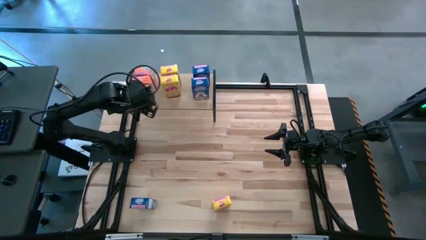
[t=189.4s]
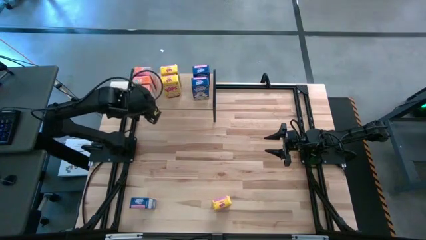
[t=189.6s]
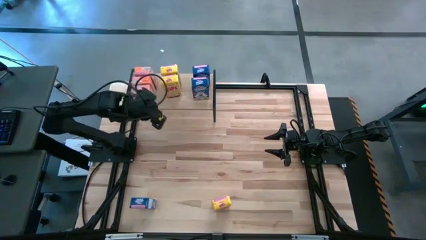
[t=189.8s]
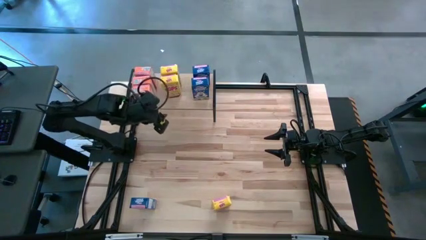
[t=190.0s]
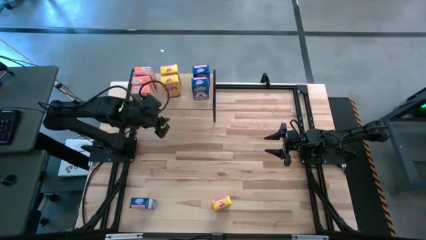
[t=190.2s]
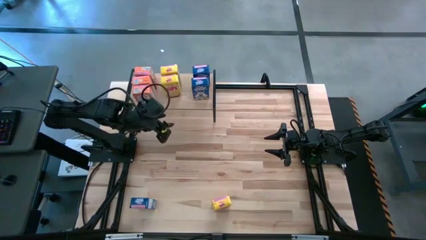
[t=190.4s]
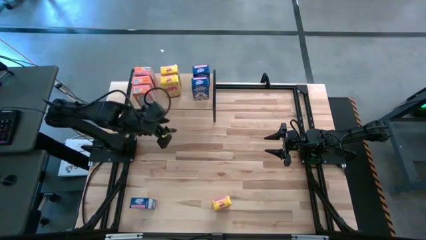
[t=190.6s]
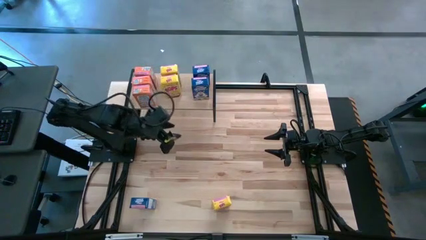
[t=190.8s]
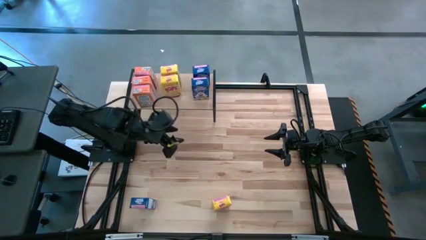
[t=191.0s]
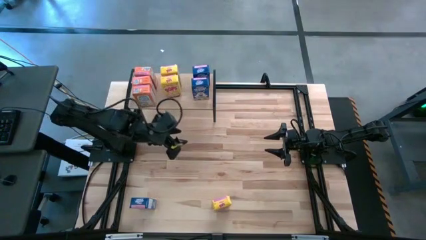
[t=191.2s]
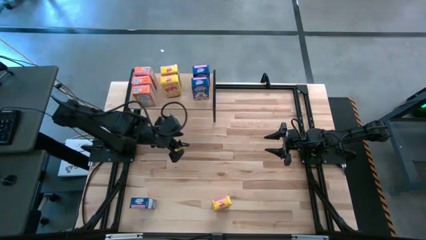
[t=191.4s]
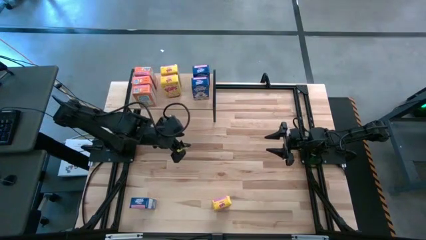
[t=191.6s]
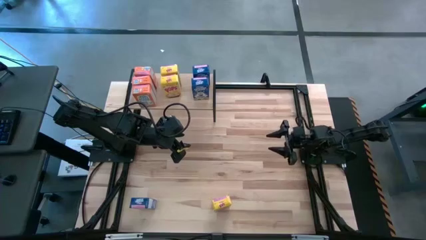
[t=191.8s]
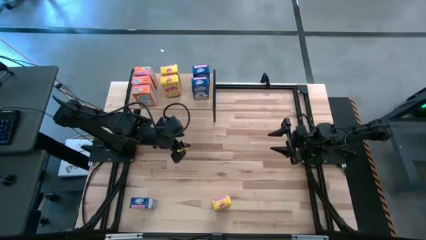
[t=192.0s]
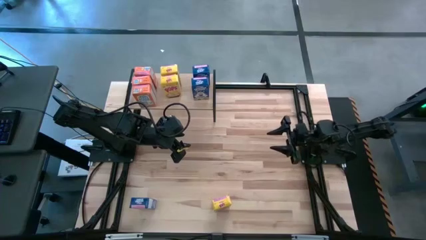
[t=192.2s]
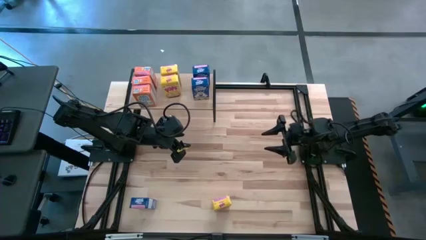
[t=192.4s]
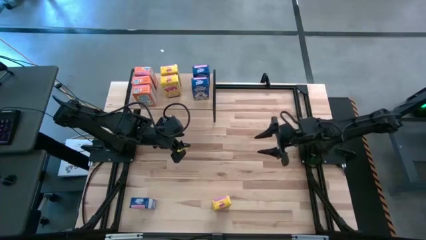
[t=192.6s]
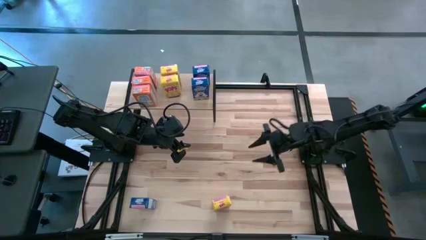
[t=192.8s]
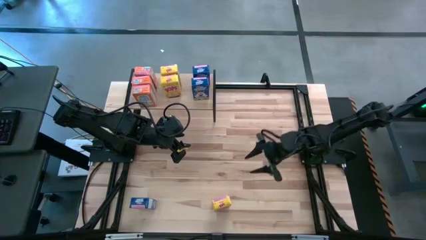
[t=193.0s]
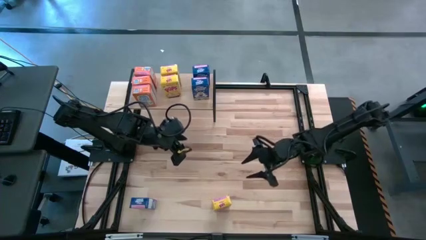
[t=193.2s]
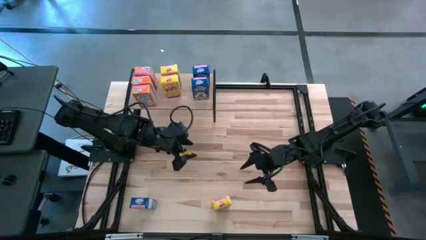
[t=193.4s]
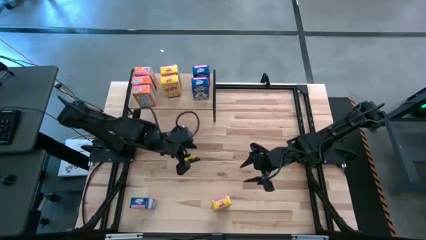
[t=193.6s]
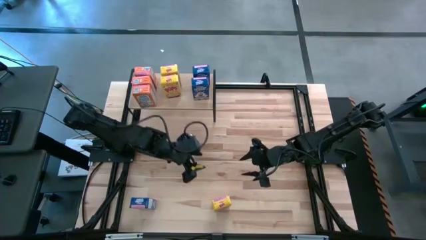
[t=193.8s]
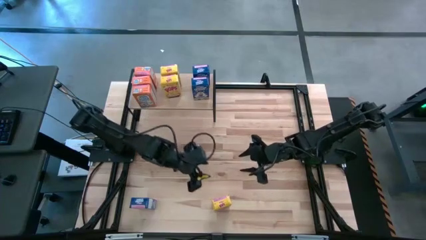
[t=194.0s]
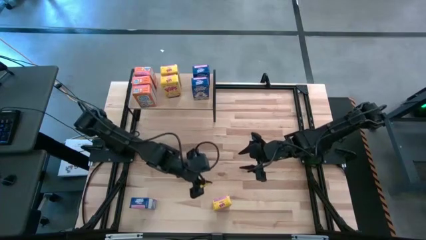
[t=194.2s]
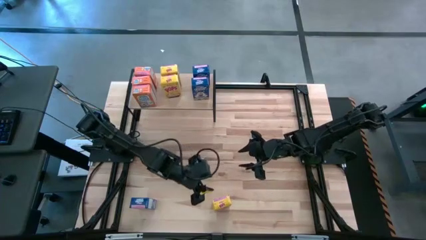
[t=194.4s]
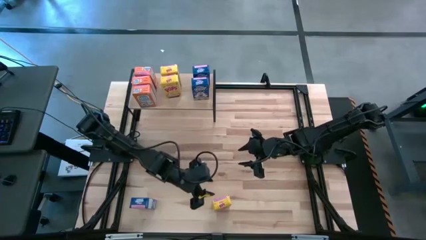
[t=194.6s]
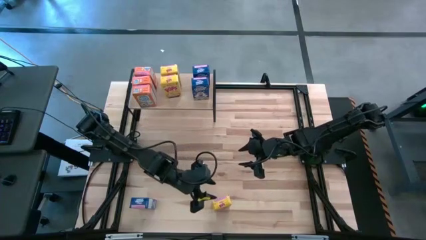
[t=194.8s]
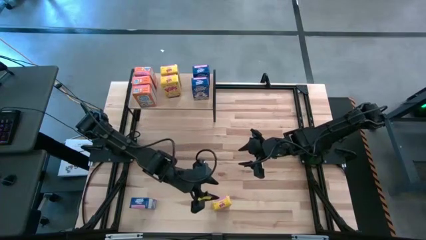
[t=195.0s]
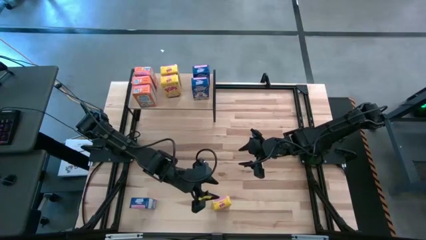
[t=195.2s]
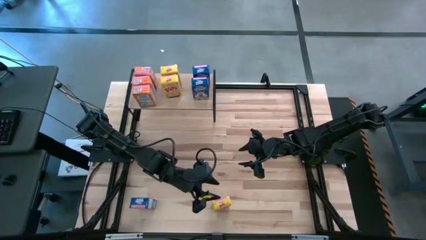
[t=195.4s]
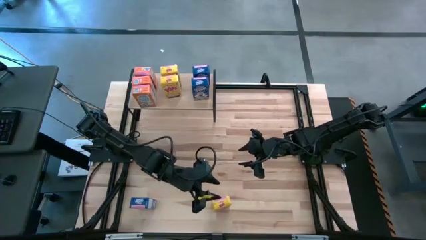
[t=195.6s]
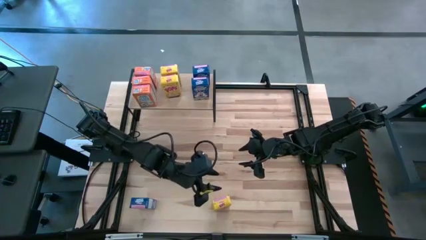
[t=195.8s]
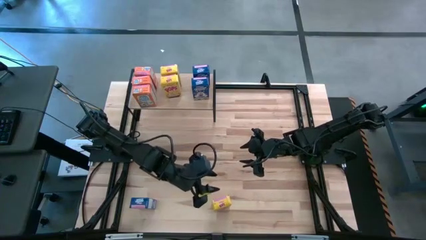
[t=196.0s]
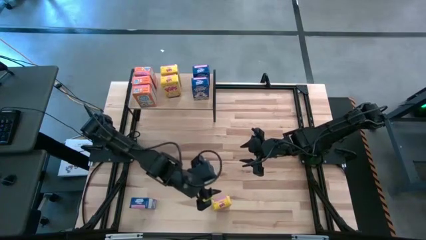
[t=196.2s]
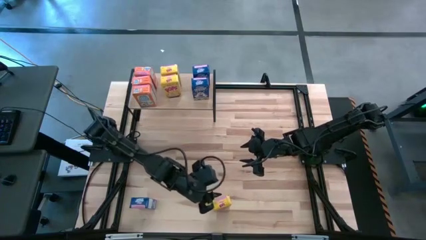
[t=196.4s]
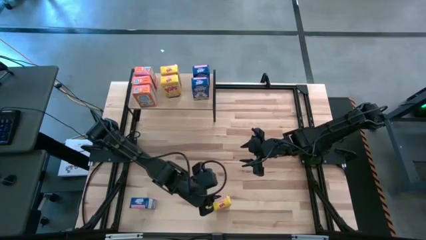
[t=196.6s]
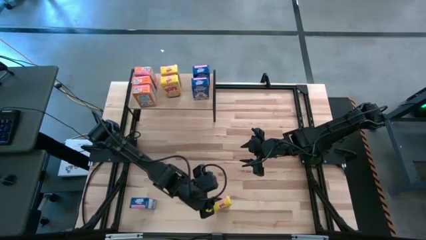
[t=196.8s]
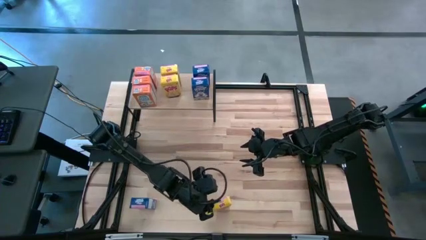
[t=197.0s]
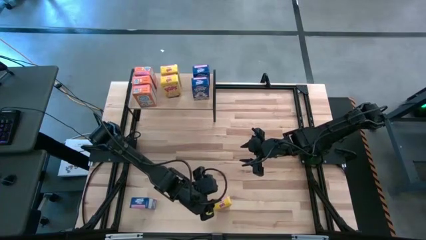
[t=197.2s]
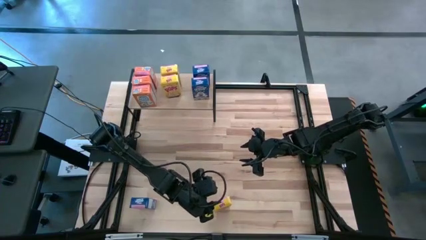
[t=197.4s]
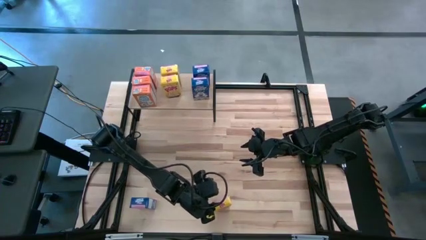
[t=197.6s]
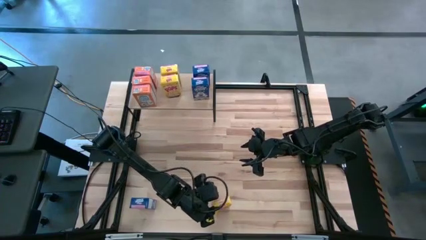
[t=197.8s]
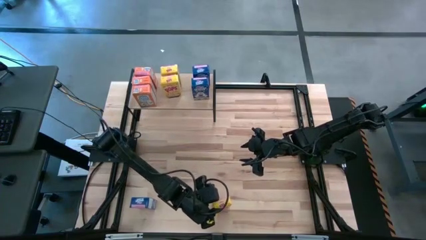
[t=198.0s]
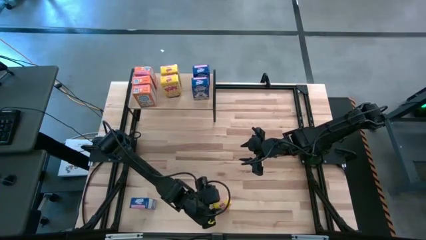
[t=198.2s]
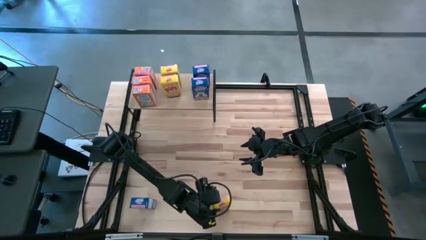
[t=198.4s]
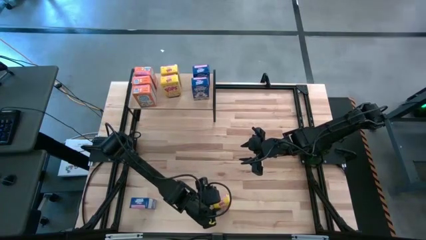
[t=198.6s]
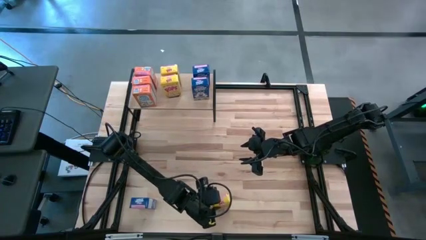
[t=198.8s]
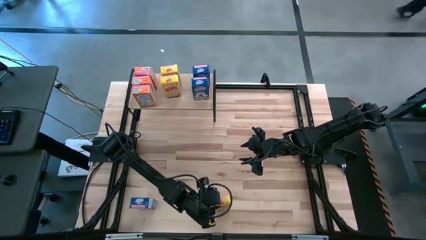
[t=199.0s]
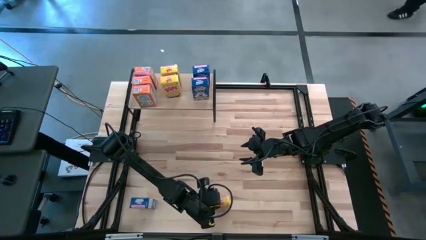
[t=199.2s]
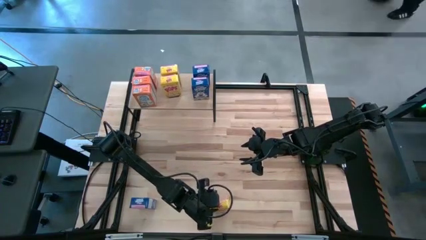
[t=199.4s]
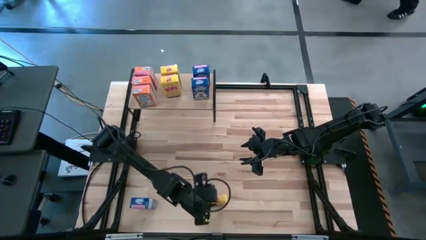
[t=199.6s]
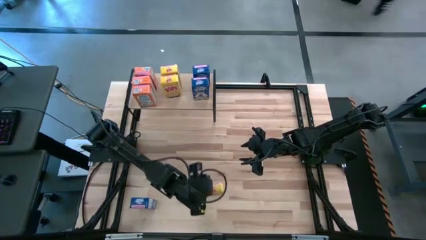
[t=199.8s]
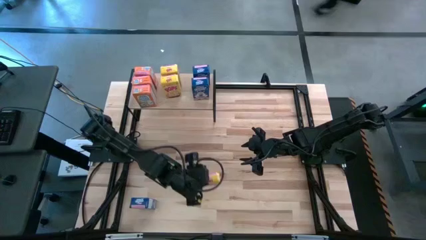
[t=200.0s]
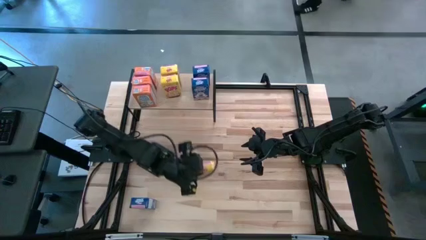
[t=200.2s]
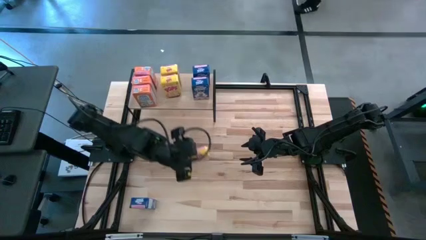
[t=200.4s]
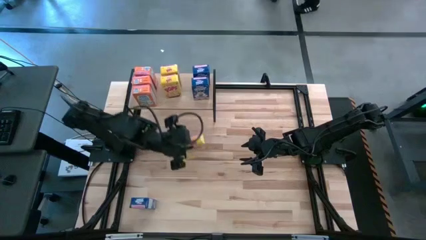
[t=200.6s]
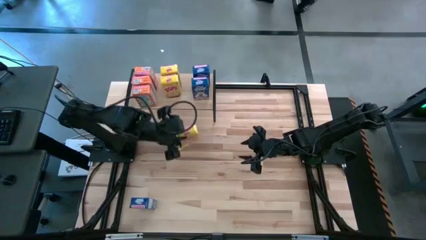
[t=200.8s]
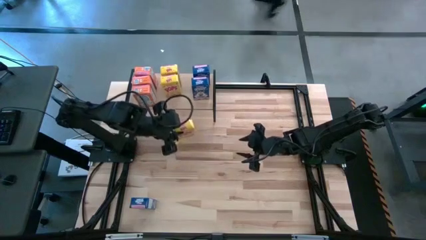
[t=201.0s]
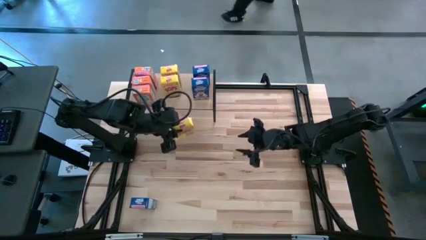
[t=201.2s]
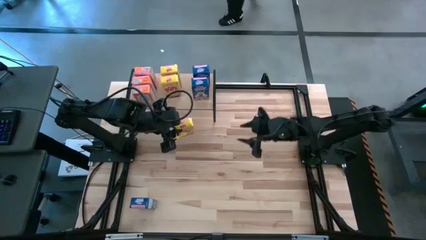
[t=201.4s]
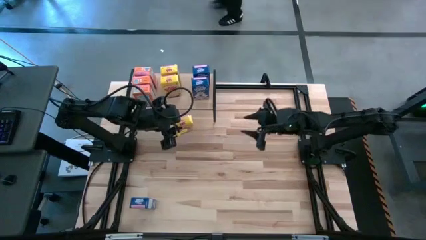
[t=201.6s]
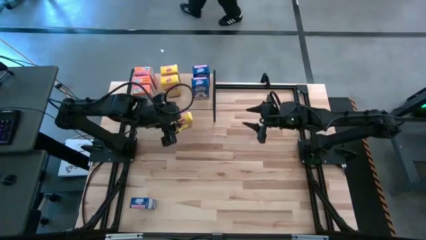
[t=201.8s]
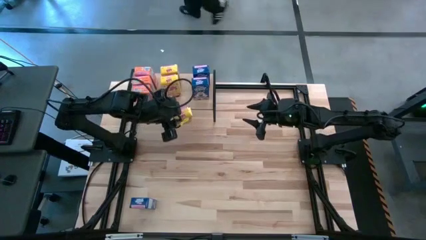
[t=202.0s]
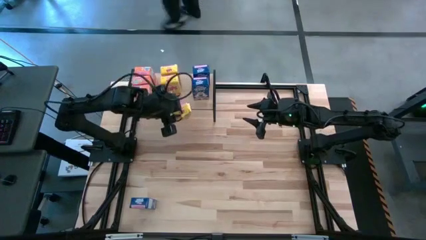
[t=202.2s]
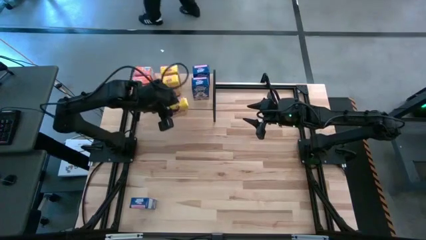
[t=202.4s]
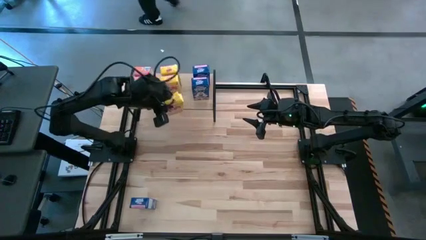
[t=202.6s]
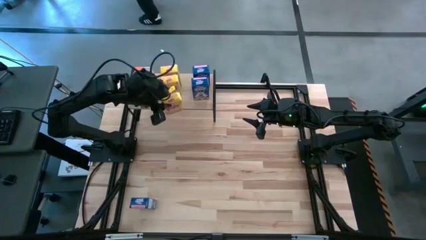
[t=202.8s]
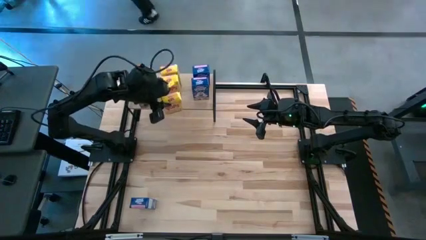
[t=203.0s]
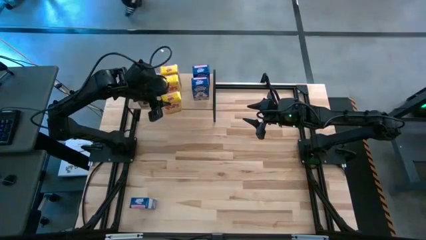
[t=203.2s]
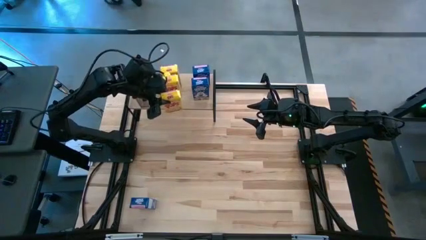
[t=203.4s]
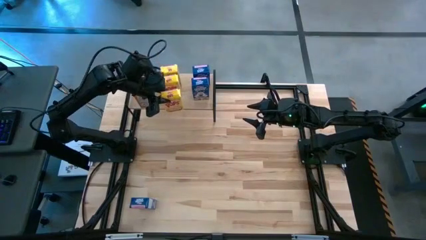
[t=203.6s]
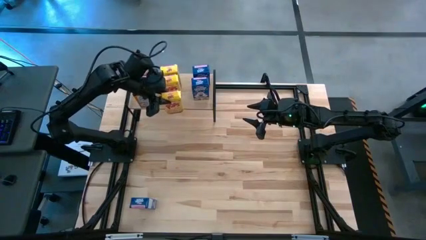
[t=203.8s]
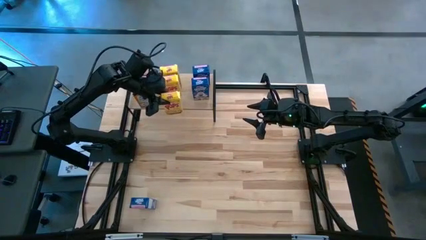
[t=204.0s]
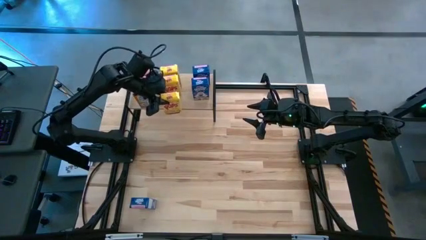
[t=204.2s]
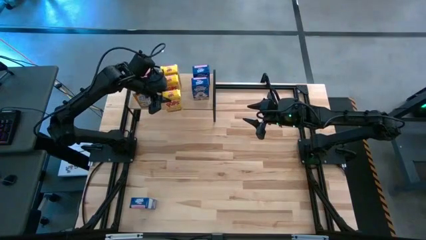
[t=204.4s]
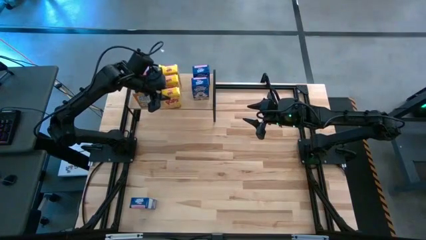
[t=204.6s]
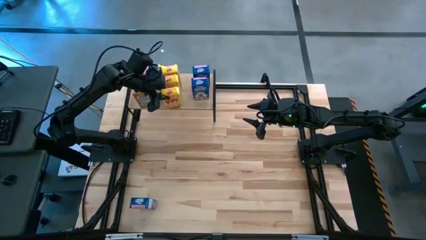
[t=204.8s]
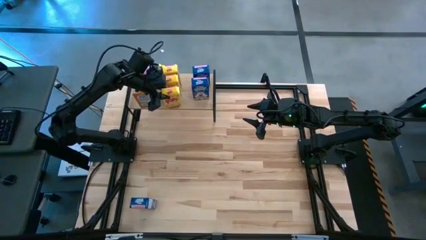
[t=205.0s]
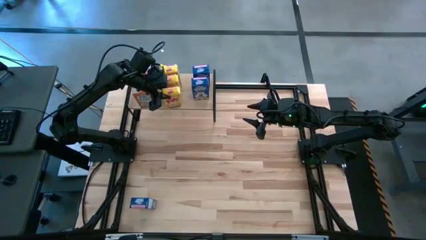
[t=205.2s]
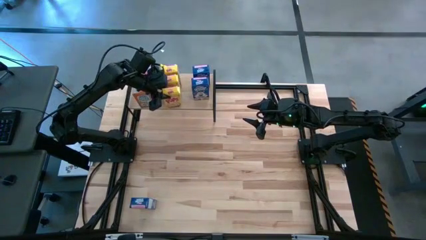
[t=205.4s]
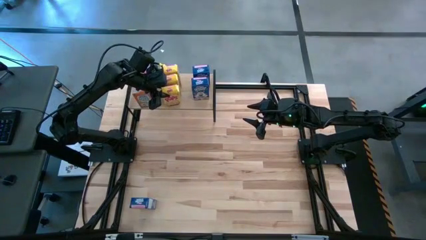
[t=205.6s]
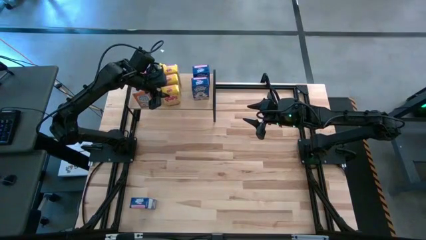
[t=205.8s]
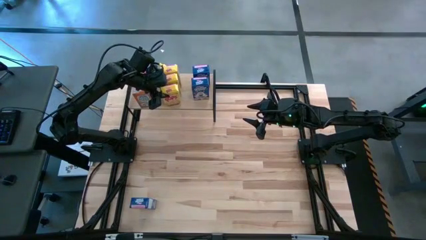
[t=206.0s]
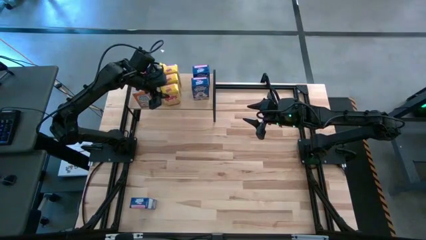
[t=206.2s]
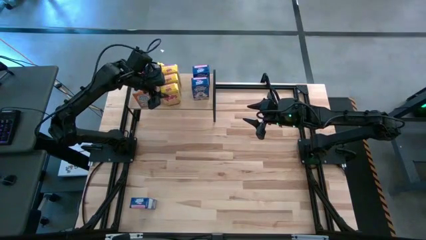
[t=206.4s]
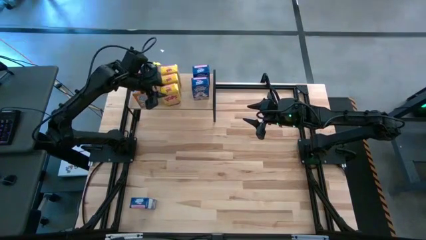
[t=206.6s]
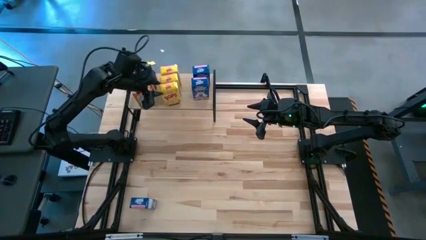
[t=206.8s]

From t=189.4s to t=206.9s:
Task: Stack cereal on shelf
Put the yellow cereal box on the shelf aligned with the other yellow cereal boxes
